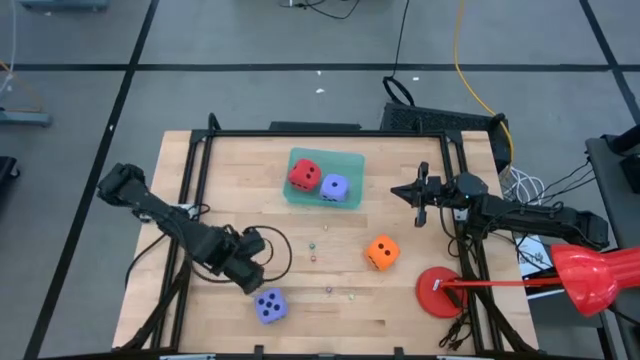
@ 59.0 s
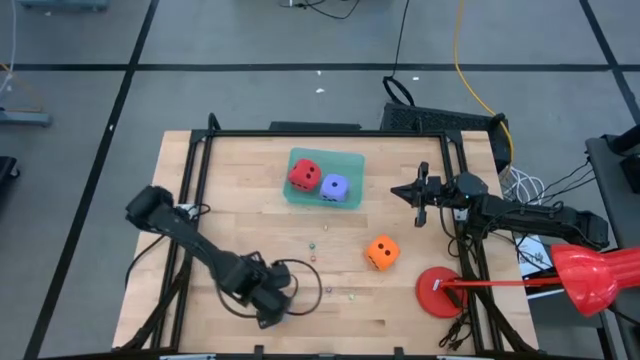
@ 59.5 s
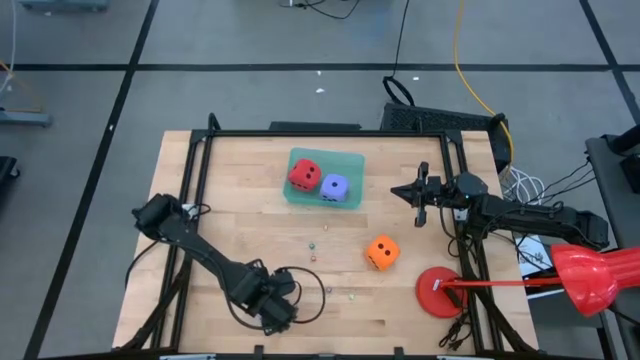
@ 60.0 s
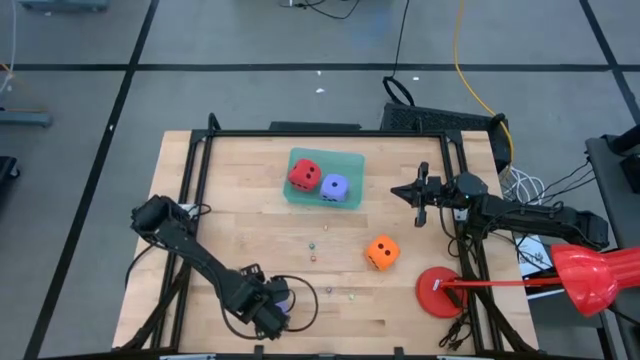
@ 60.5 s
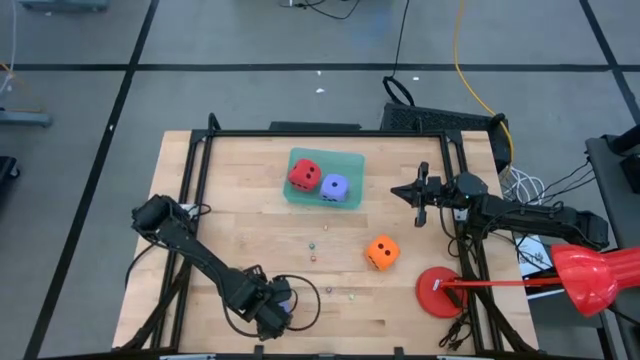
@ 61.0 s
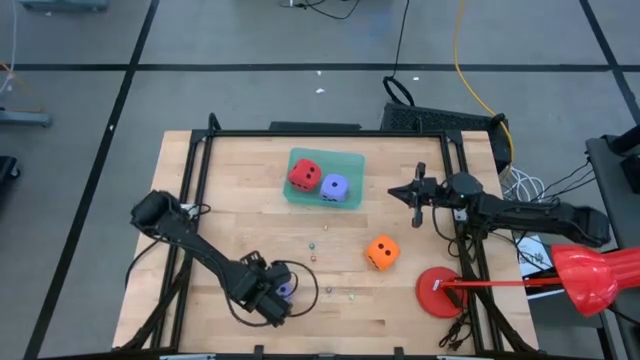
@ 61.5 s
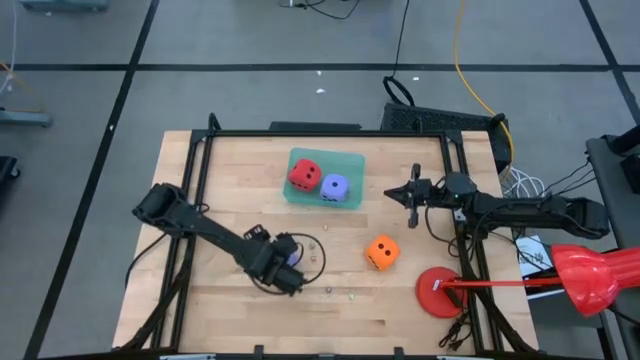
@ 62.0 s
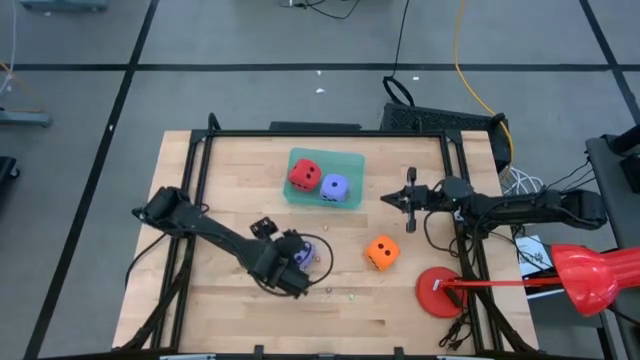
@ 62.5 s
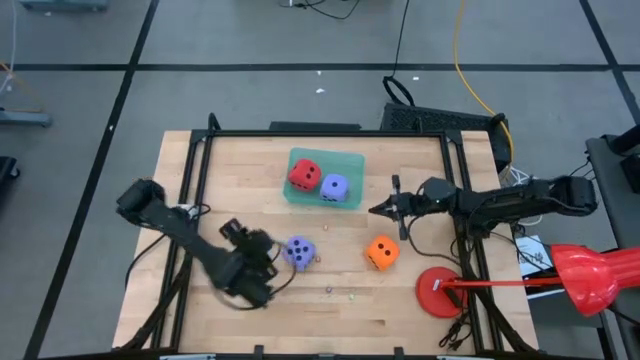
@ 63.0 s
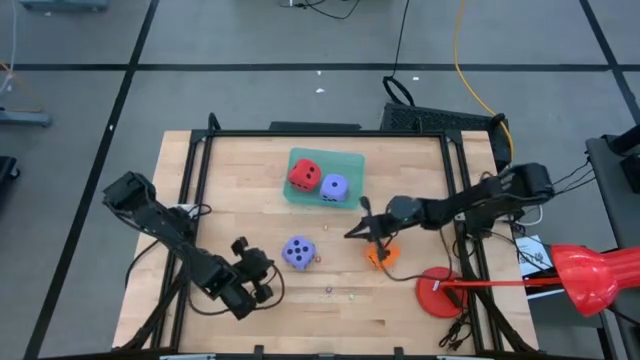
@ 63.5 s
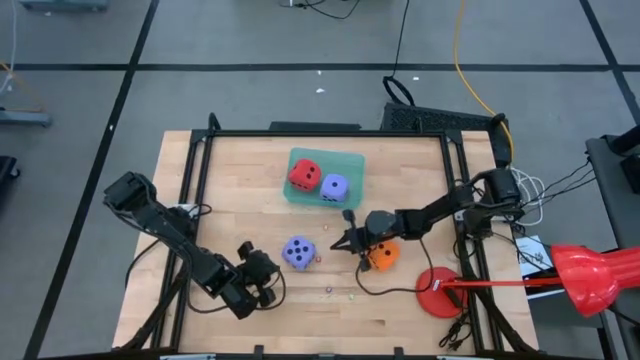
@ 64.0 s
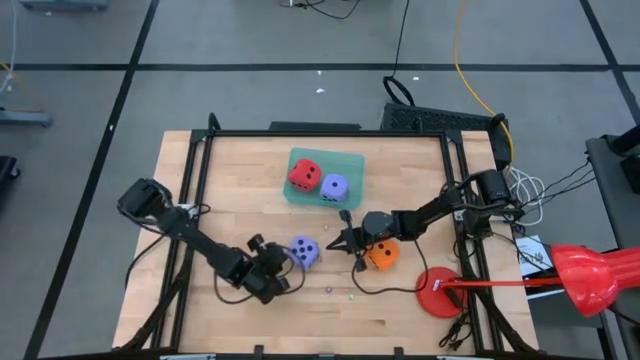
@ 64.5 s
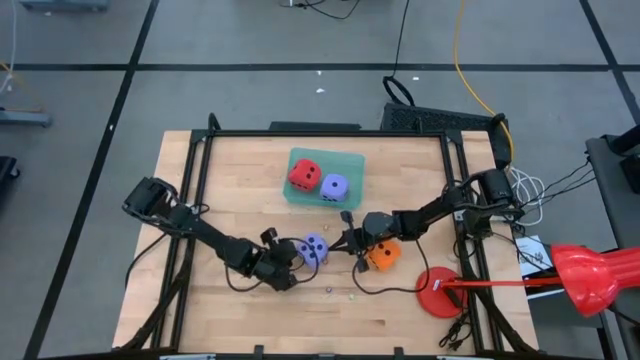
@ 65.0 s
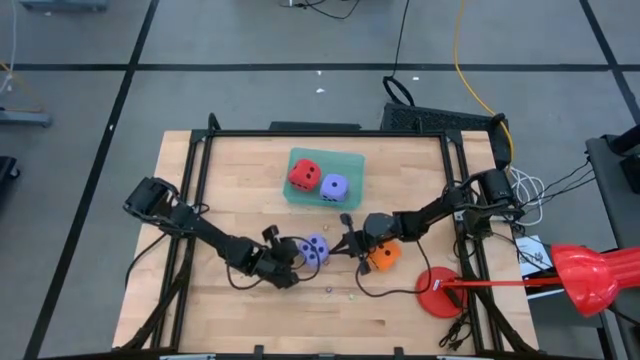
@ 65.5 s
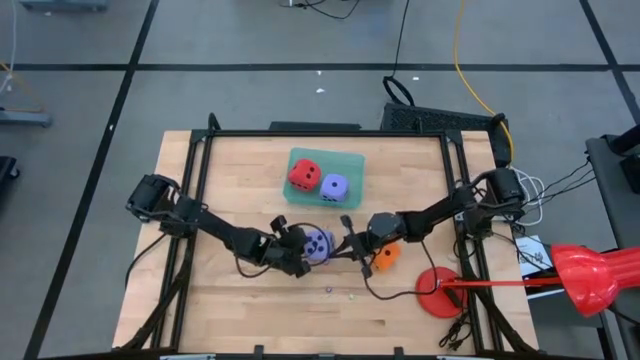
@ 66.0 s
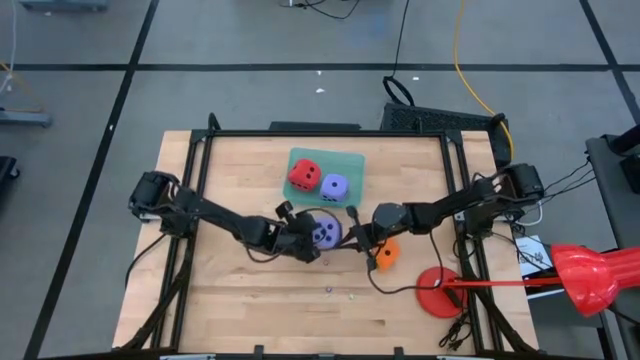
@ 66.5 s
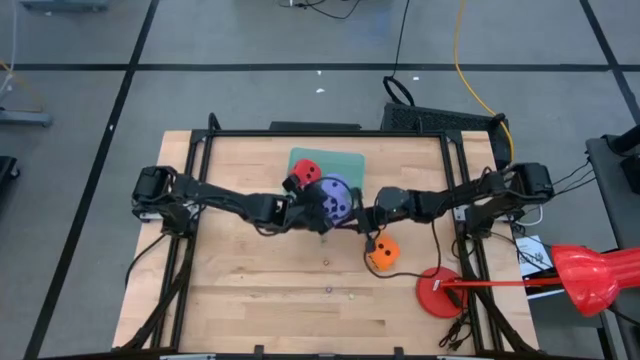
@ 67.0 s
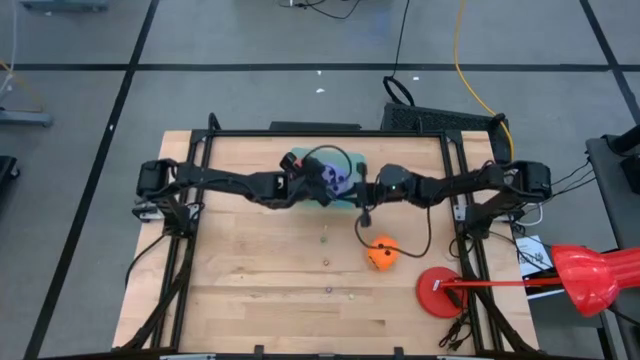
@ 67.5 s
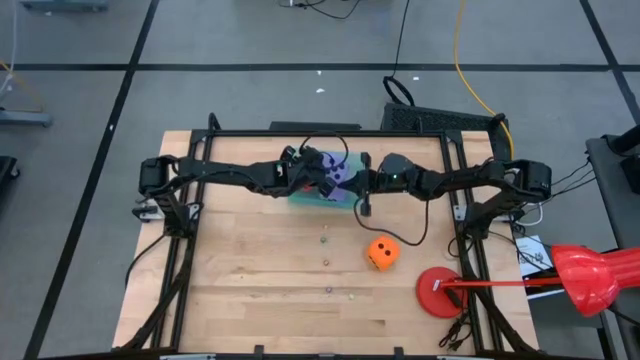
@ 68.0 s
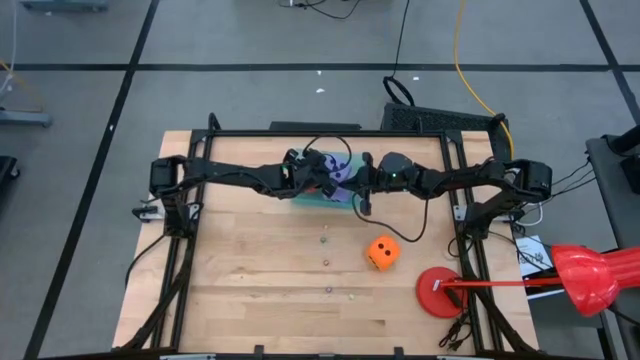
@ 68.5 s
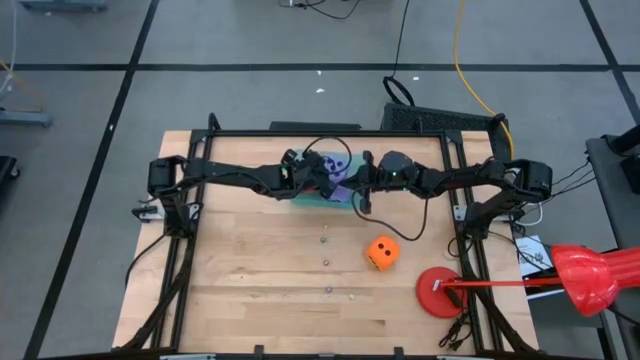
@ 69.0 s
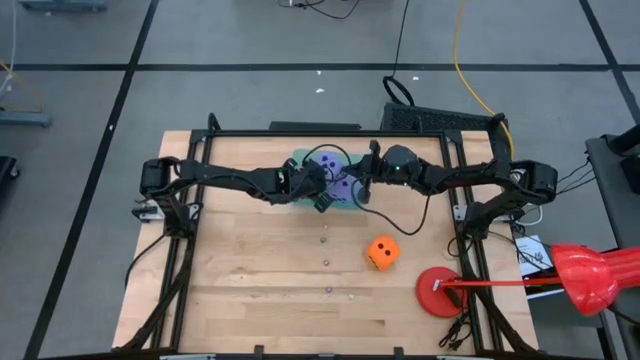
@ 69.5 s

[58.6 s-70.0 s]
Task: Pick & Place Dice
Put the large purple dice into the blue bin

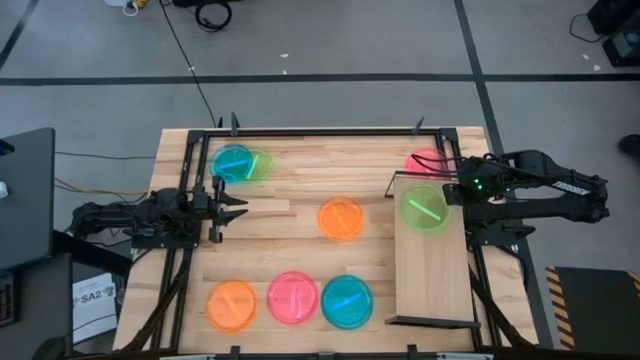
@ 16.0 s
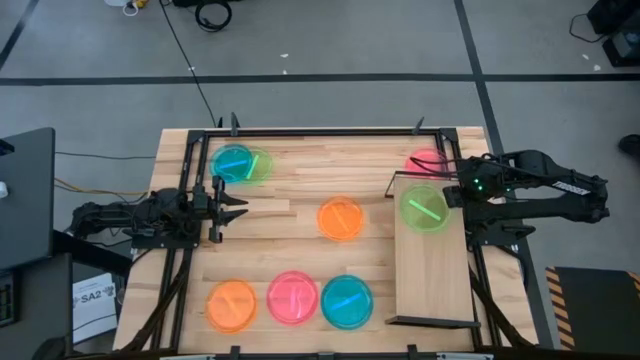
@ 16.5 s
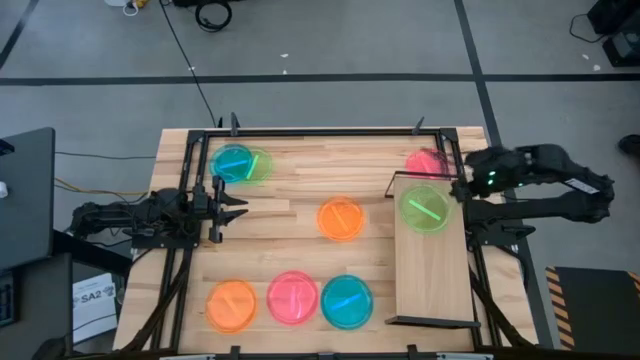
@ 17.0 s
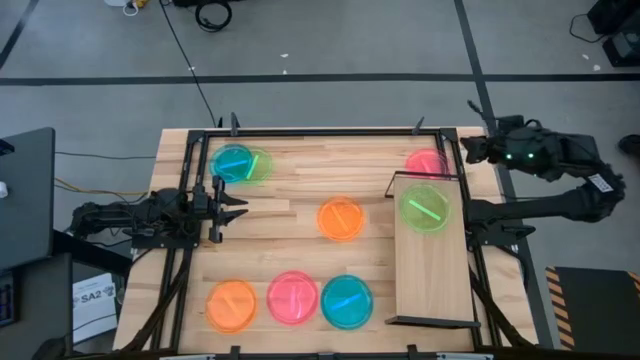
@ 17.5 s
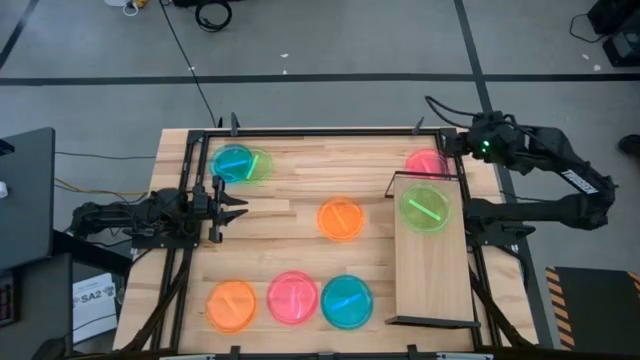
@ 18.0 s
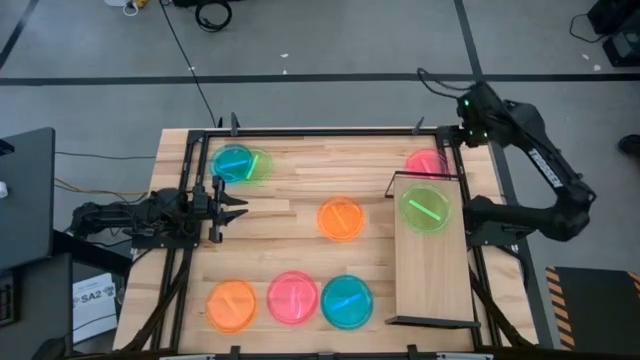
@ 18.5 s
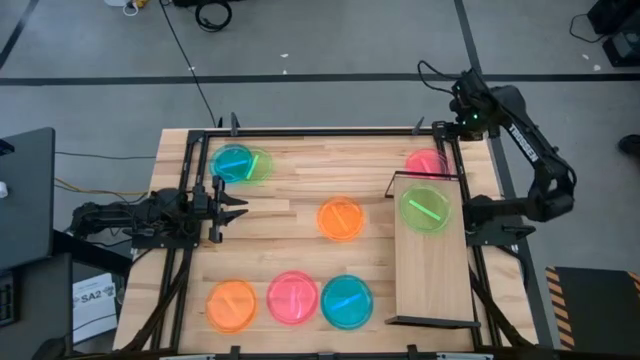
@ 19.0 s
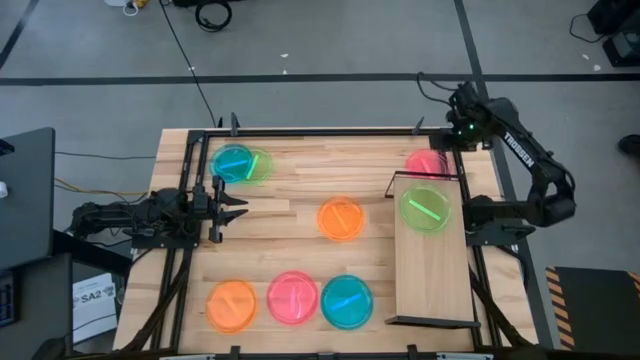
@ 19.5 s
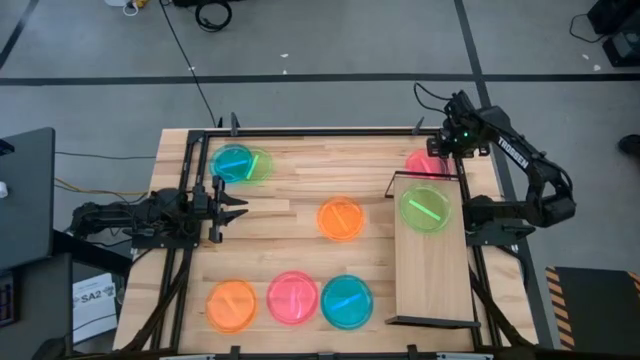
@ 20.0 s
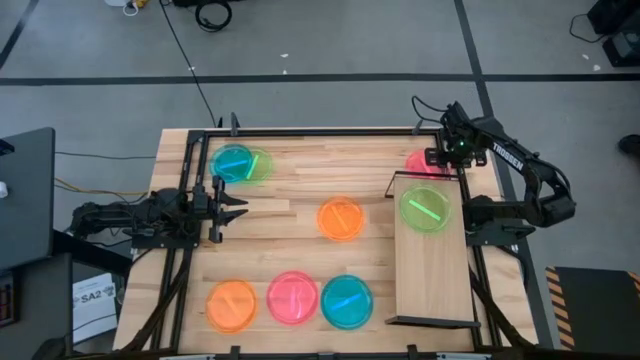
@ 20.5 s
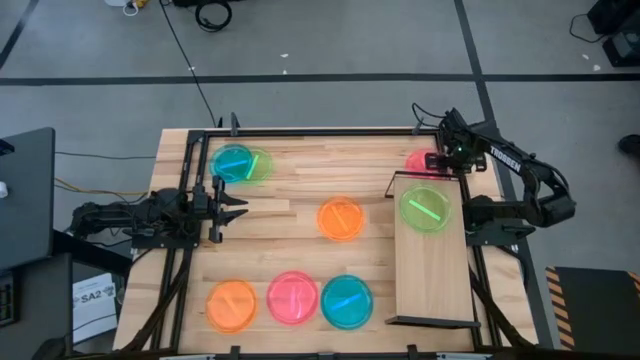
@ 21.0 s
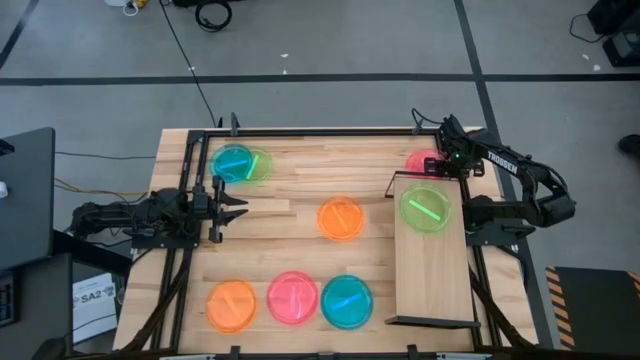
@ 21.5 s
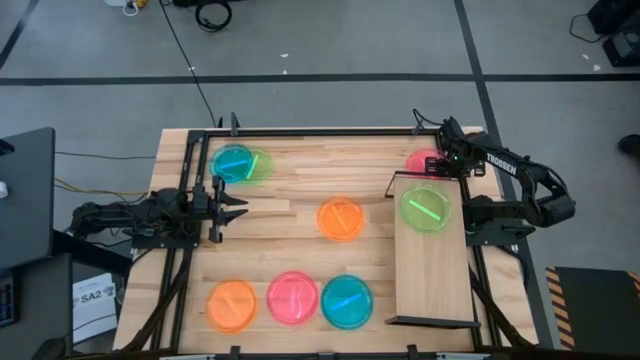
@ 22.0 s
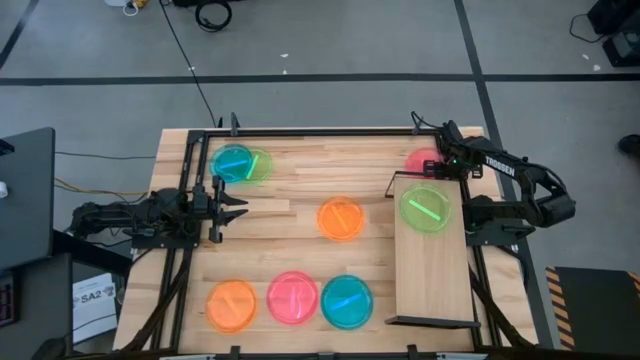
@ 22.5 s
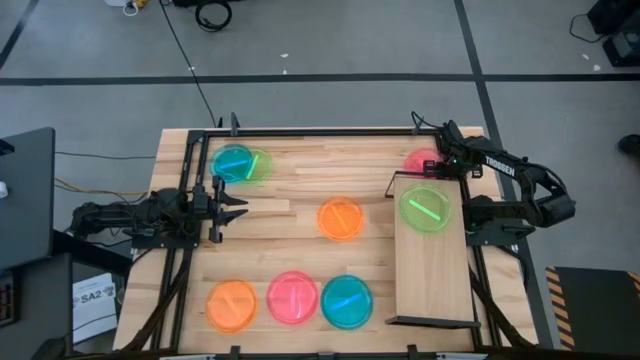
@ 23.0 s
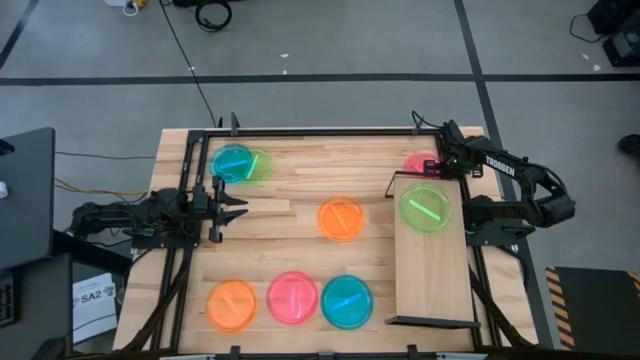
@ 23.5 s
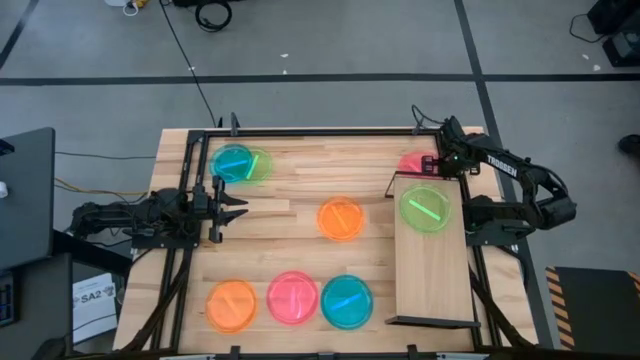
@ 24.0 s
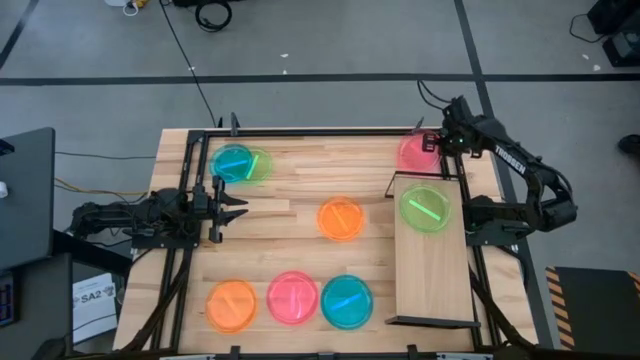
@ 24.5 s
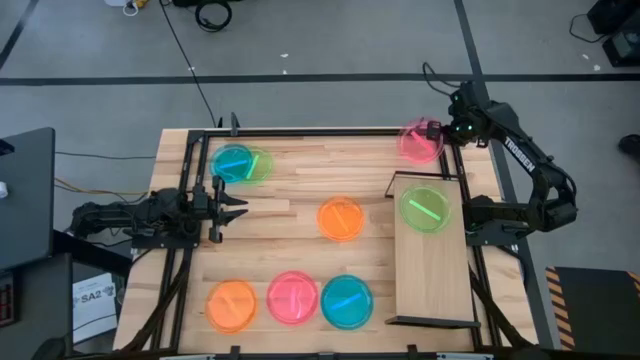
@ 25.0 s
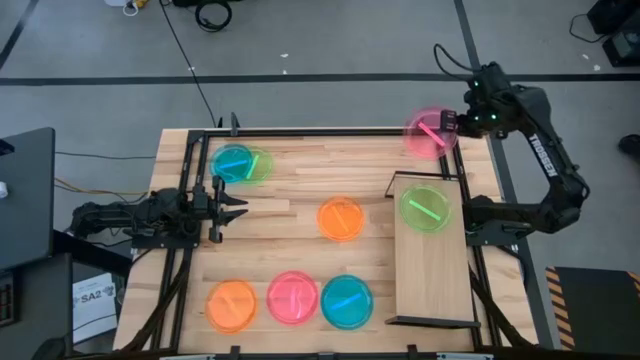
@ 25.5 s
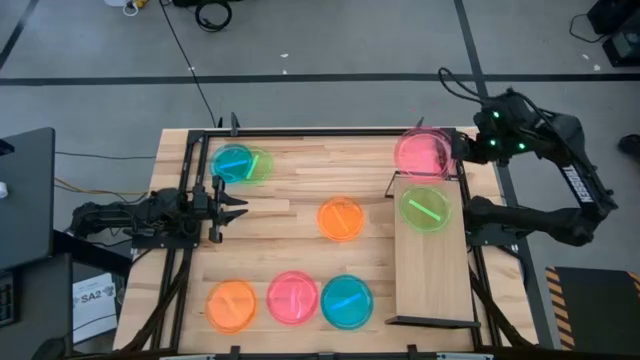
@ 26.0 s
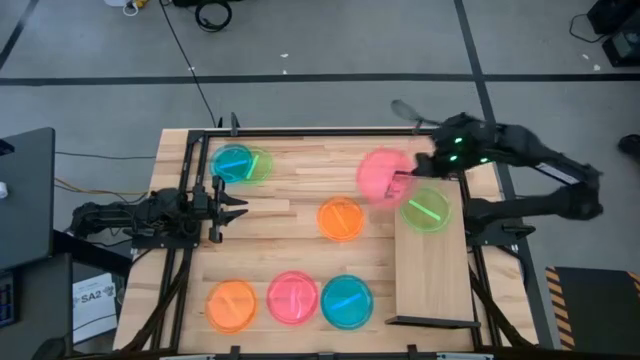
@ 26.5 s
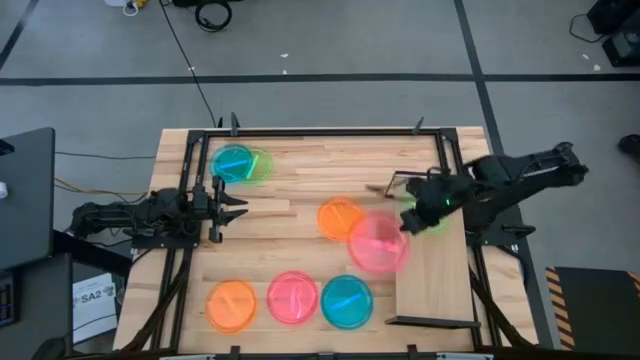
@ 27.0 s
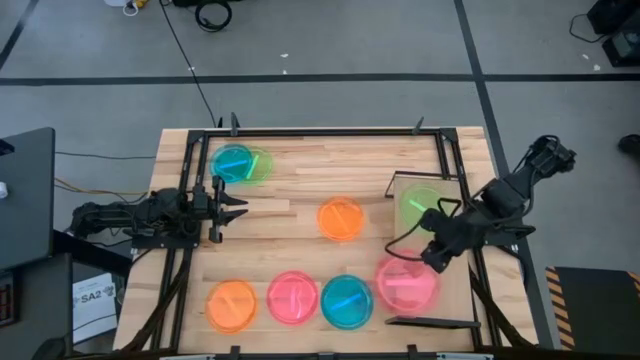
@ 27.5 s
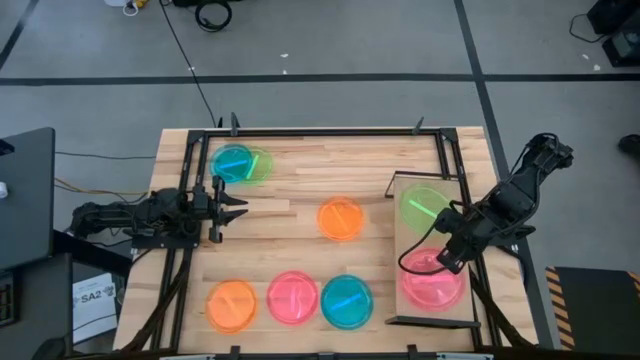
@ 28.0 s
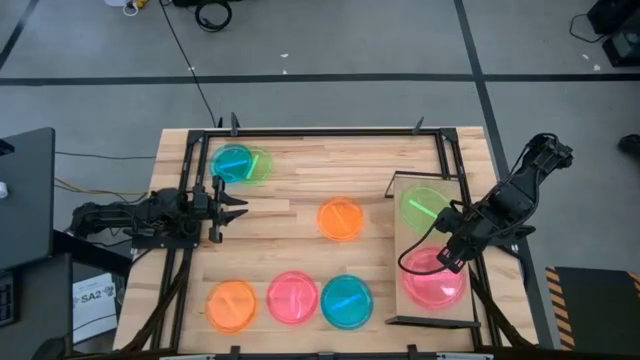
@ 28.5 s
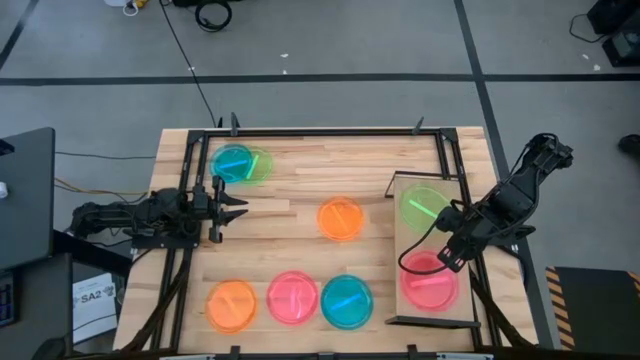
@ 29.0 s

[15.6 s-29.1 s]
Task: Place and stack plates onto a shelf
Put the top pink transparent plate on the shelf
